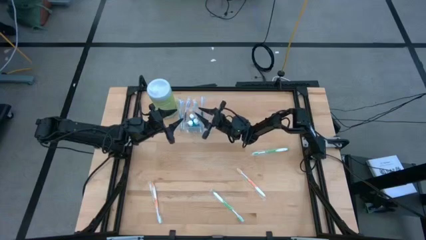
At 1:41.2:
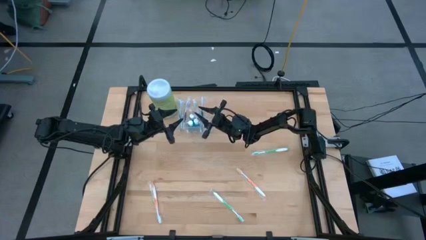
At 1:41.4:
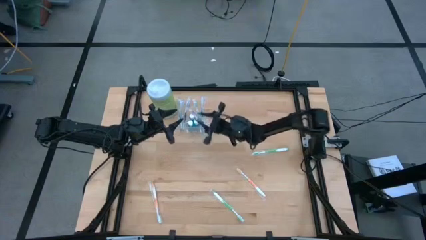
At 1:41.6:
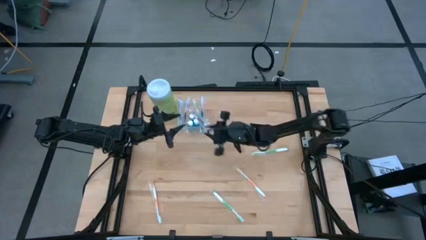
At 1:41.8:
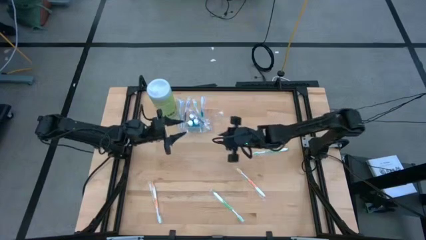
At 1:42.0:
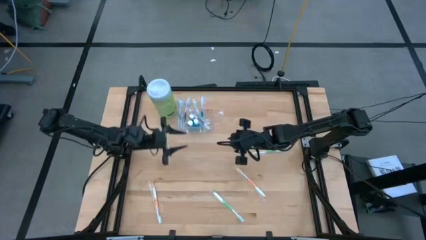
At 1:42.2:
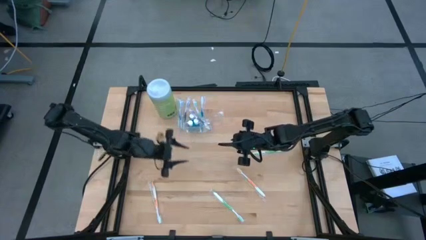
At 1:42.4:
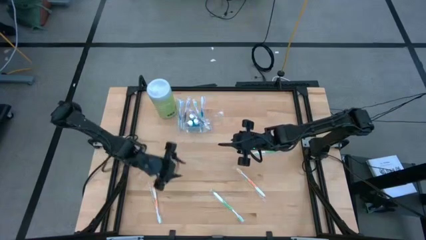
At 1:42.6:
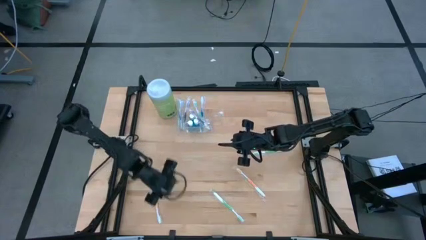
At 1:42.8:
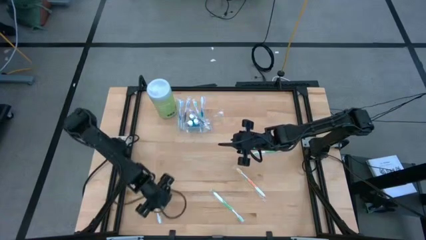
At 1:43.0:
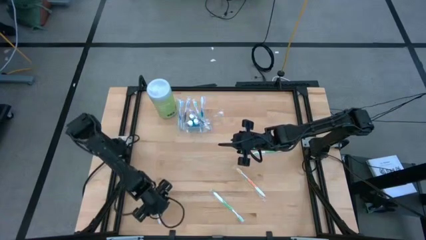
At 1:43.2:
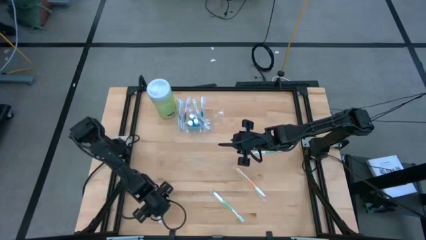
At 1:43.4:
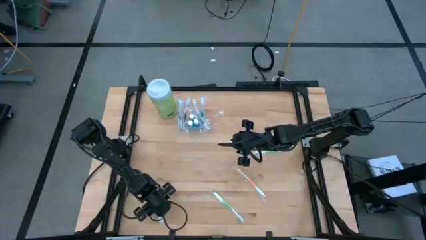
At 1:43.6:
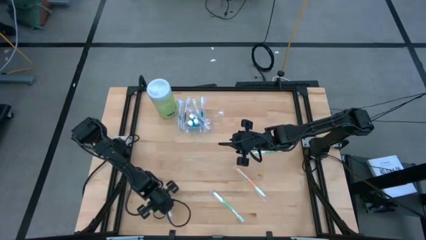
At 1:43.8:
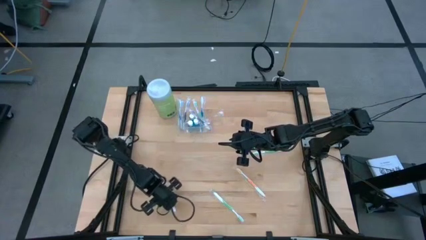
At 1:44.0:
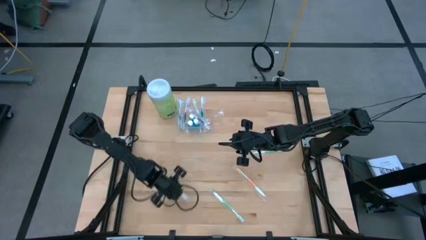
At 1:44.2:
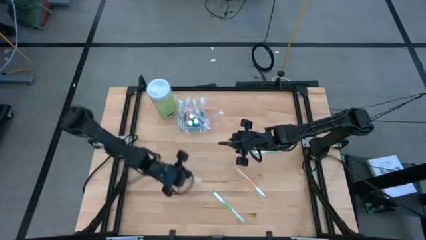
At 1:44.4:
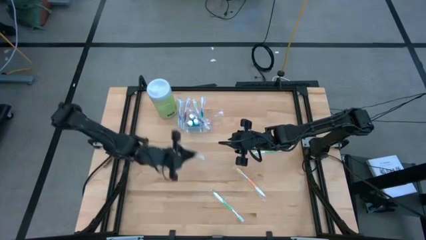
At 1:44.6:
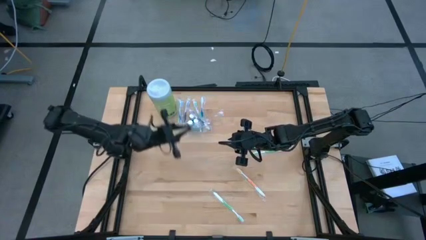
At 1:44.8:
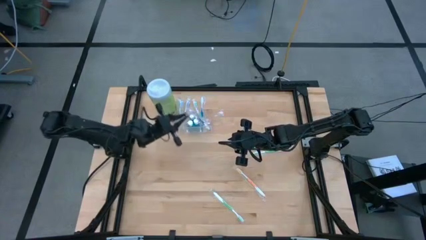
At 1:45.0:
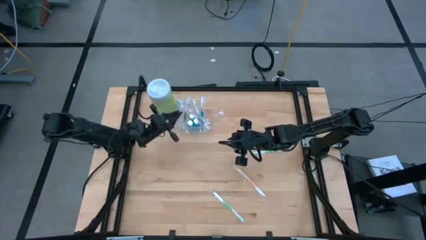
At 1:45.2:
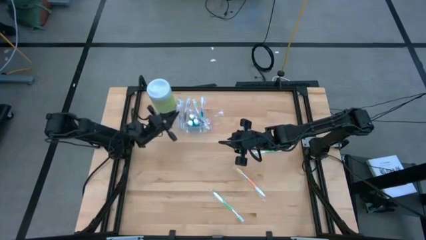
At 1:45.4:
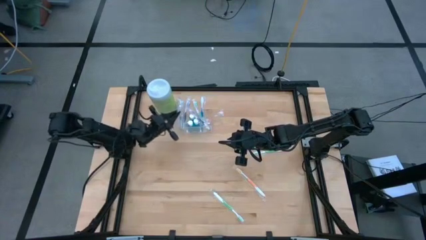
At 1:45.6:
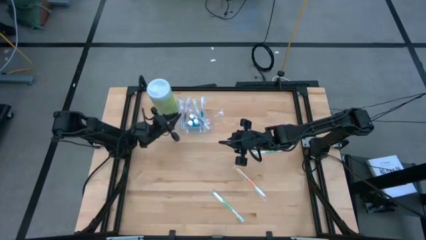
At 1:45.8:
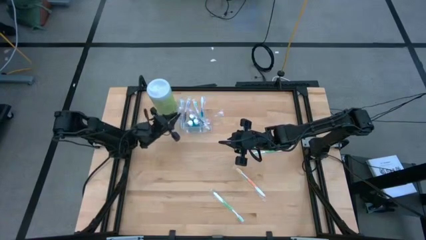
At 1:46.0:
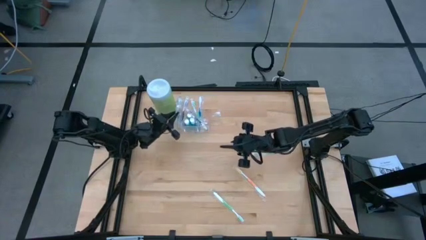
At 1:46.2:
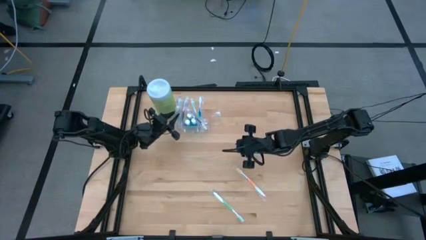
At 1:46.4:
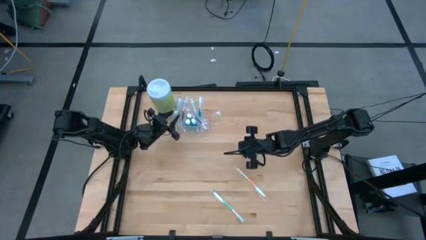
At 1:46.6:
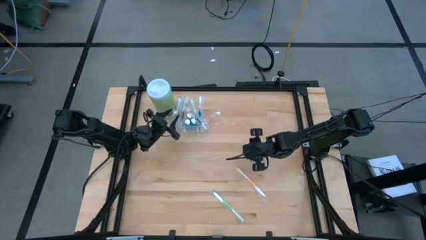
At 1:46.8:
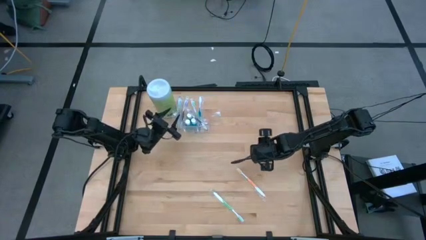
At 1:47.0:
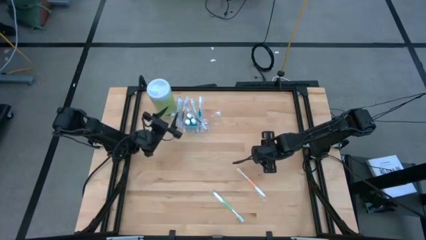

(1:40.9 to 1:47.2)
Task: Pick & Place toothbrushing station
Put the orange toothbrush into the transparent organizer

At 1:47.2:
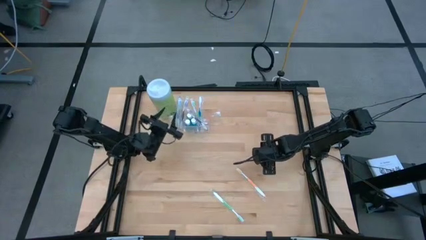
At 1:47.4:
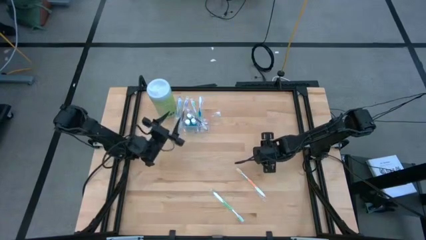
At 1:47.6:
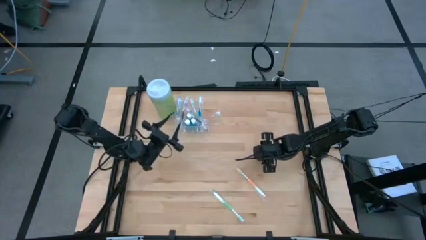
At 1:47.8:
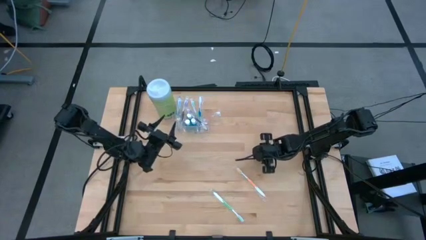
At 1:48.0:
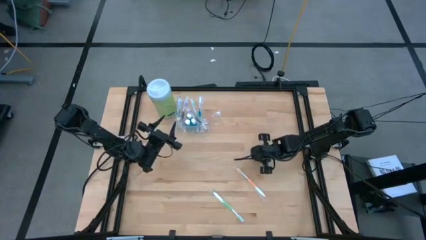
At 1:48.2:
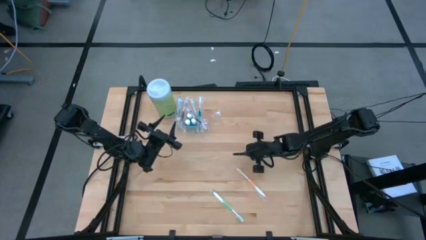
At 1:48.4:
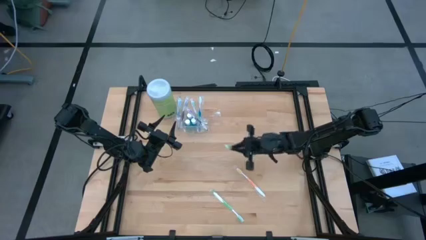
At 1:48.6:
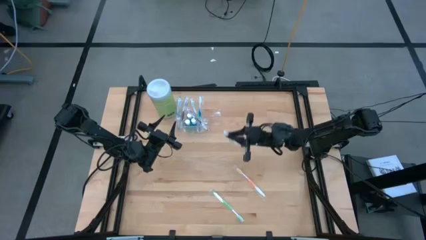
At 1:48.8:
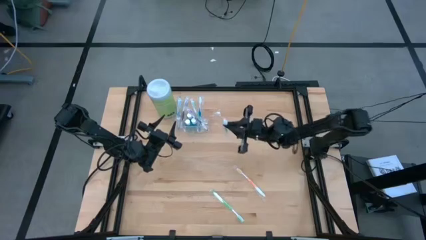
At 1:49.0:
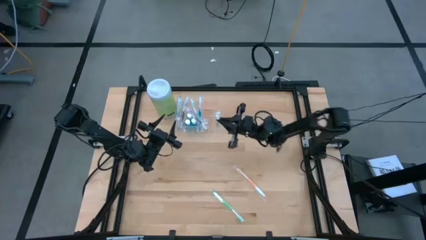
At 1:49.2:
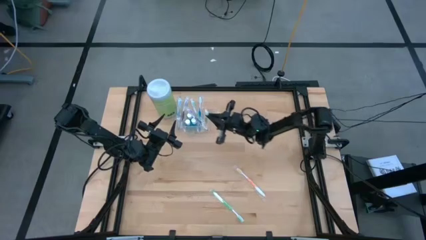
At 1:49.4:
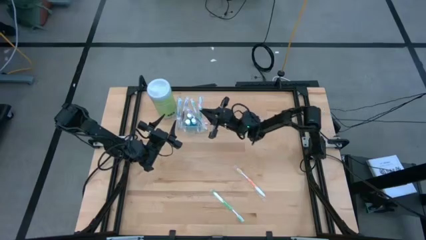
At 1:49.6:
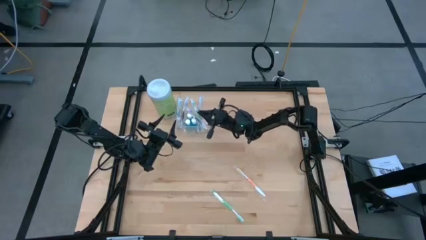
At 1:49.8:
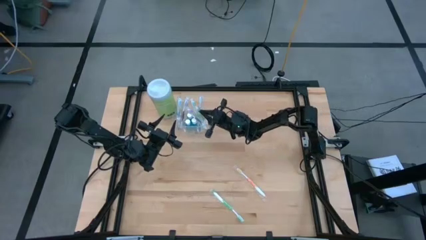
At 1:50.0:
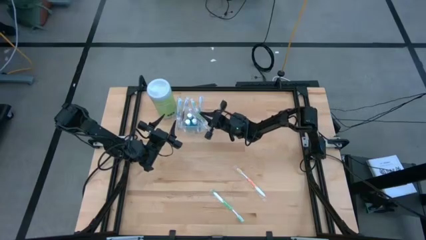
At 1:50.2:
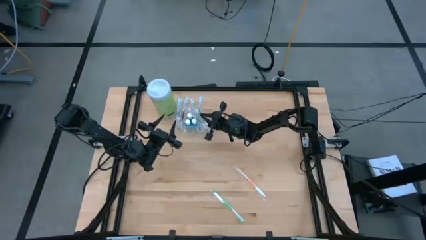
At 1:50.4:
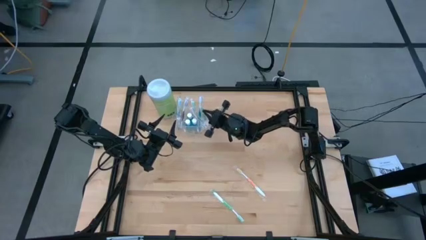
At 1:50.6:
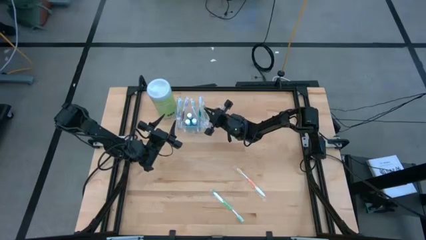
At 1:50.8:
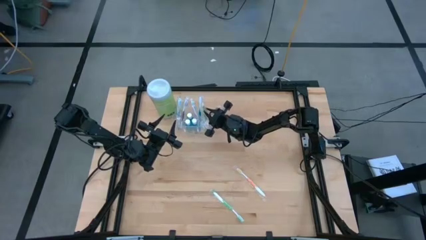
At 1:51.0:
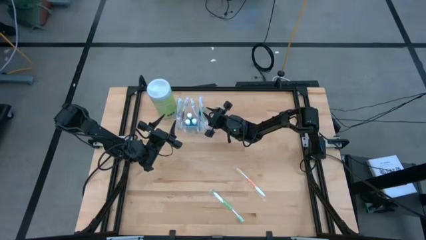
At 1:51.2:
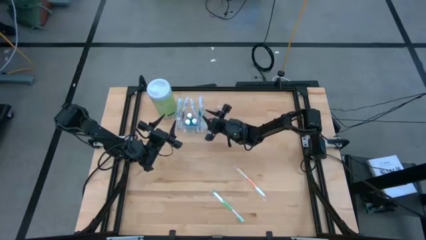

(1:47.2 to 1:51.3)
Put the green toothbrush into the transparent organizer

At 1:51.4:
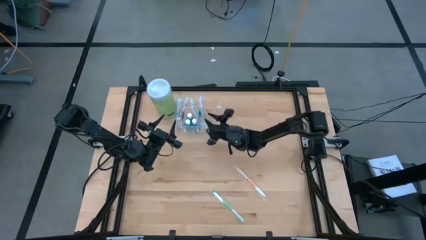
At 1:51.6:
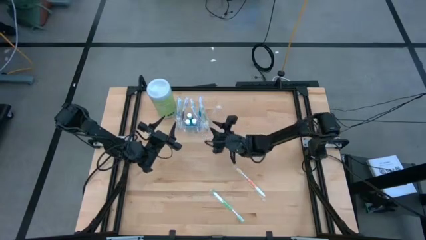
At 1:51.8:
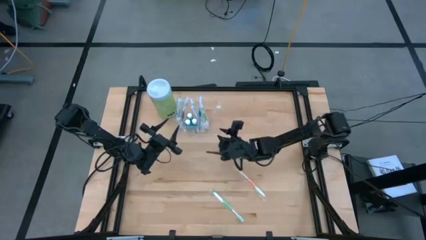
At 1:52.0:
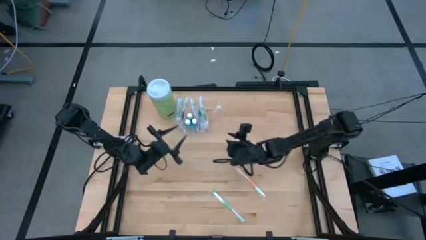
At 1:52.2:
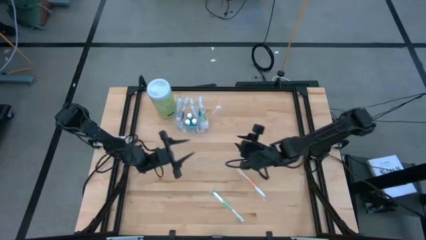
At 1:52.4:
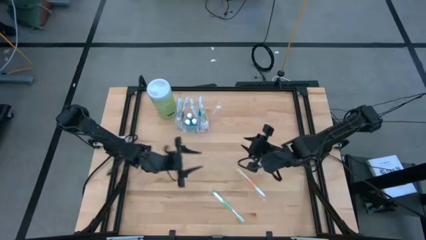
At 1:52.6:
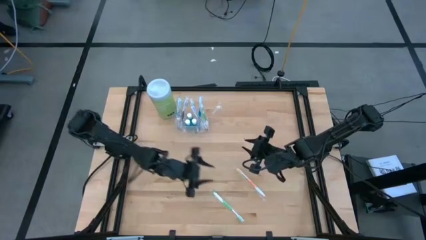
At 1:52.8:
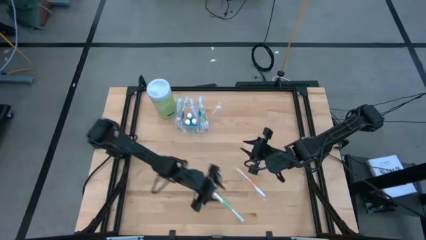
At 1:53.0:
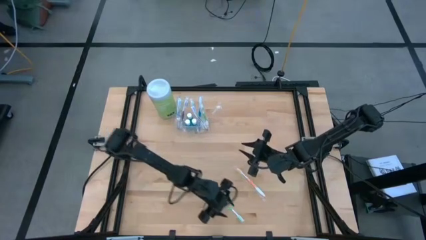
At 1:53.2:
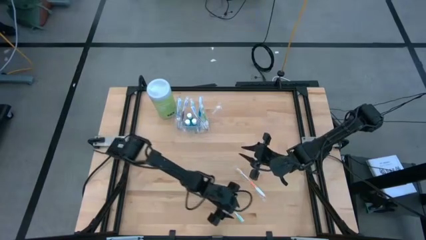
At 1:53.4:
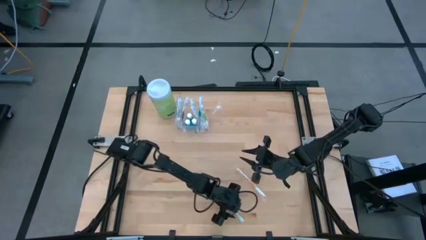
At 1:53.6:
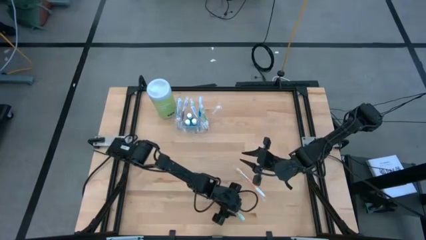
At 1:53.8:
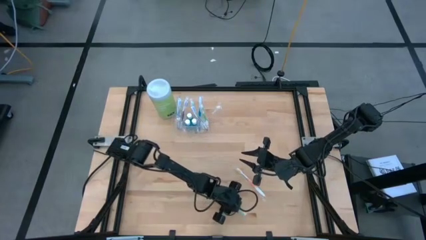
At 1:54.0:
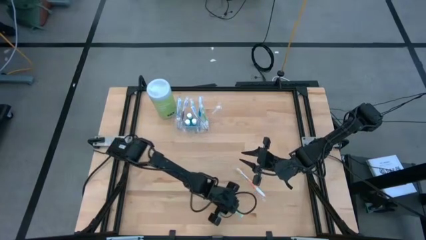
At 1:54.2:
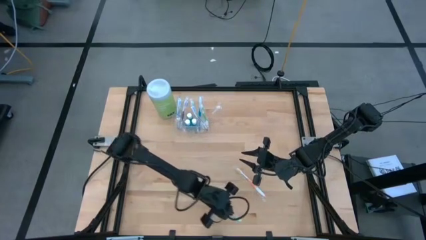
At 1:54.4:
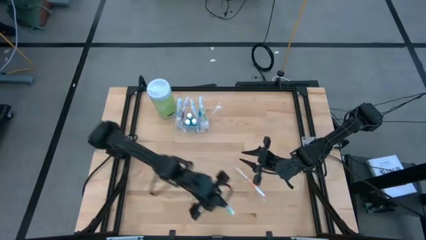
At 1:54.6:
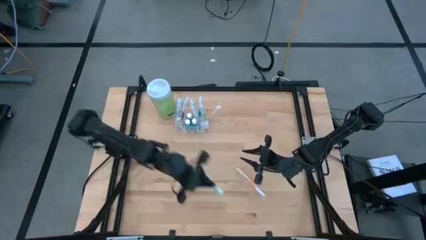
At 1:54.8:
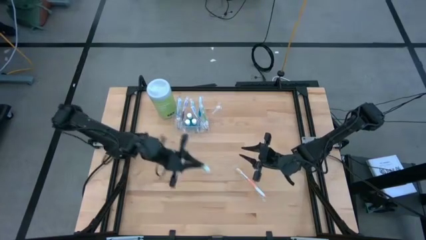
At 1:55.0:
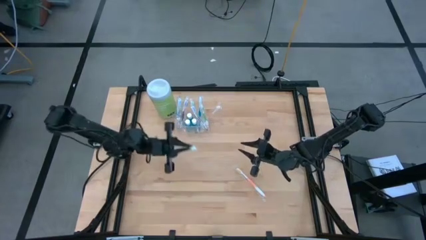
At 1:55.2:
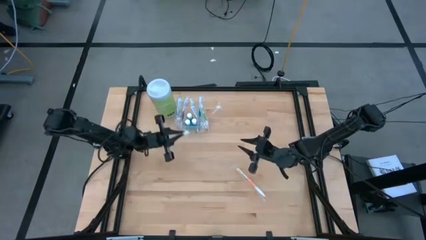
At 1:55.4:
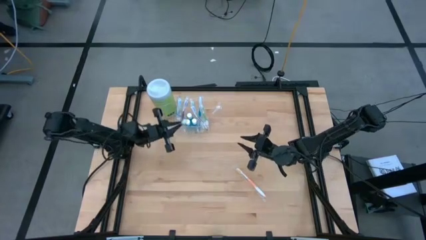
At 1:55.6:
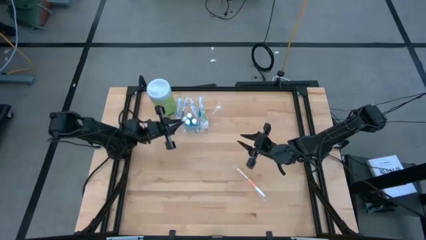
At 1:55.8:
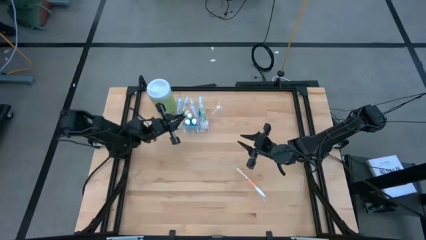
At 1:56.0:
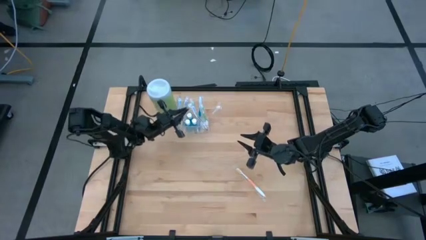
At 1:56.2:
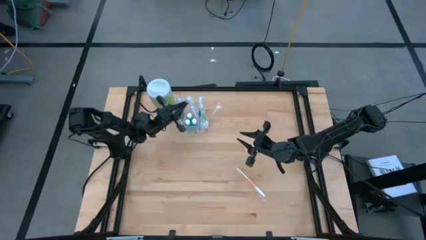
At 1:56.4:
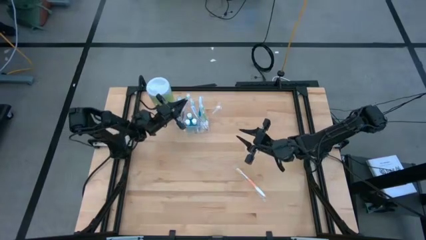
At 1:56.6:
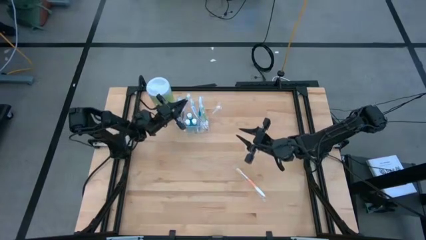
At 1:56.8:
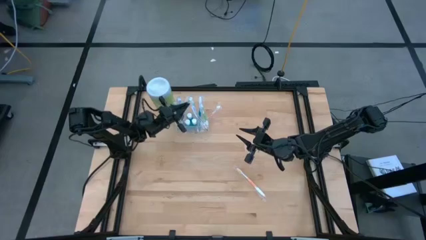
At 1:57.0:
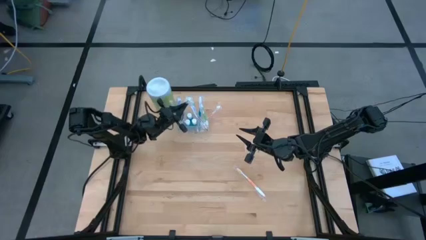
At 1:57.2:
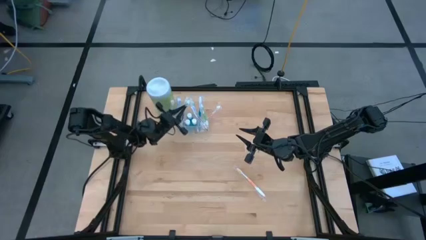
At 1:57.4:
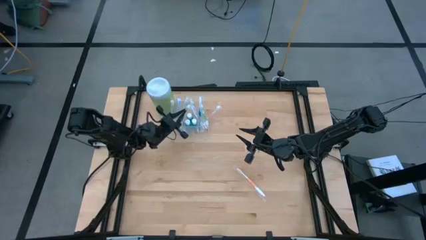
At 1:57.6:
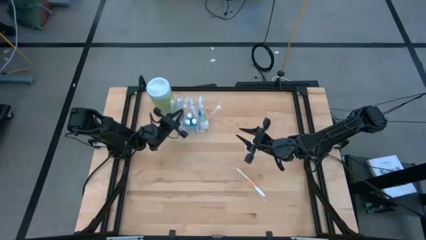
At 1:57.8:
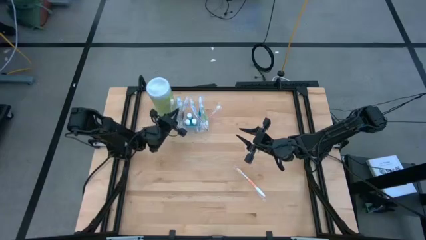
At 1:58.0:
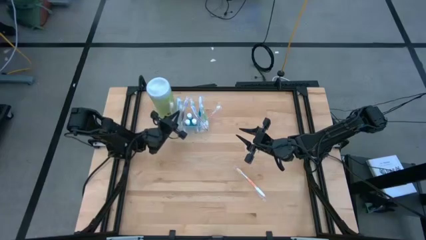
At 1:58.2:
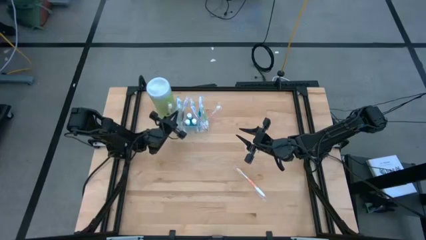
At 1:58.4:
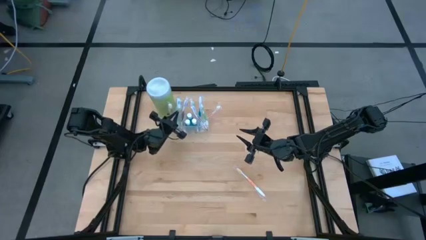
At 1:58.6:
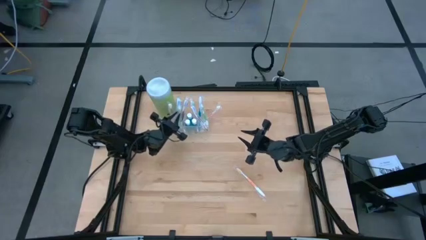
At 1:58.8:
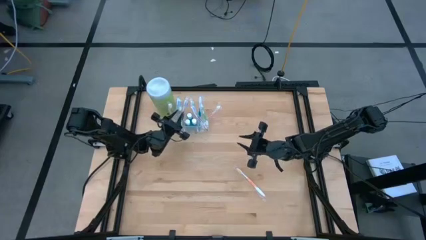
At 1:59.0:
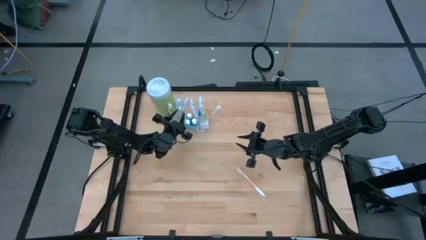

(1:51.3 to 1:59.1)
Put the green toothbrush into the transparent organizer
